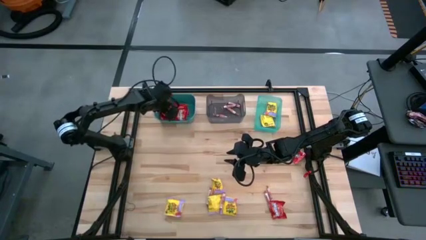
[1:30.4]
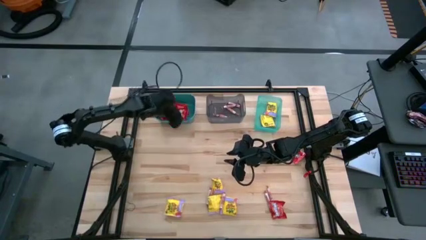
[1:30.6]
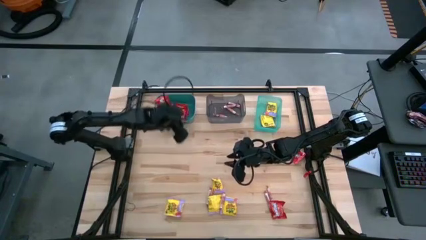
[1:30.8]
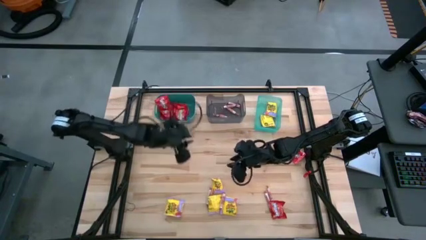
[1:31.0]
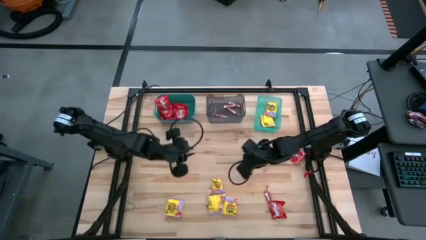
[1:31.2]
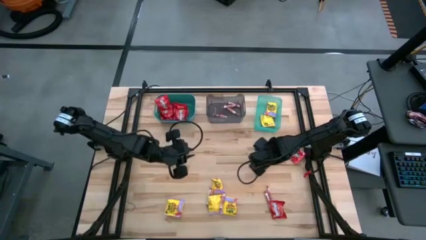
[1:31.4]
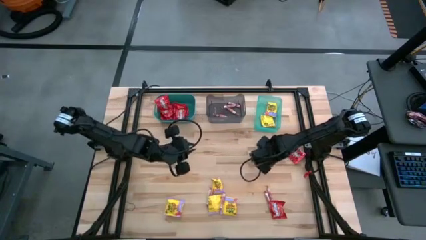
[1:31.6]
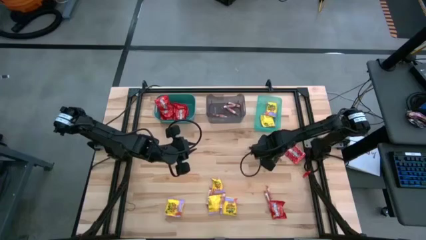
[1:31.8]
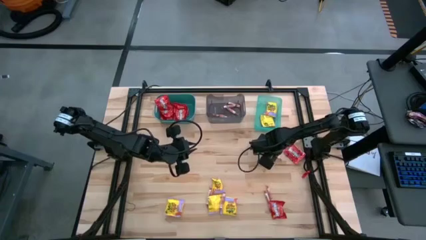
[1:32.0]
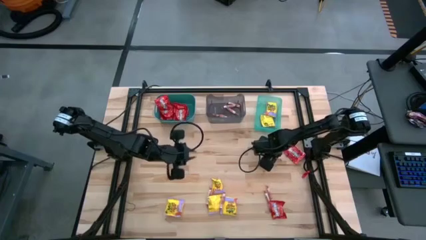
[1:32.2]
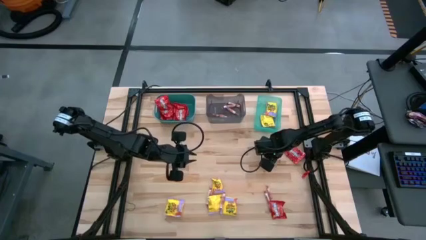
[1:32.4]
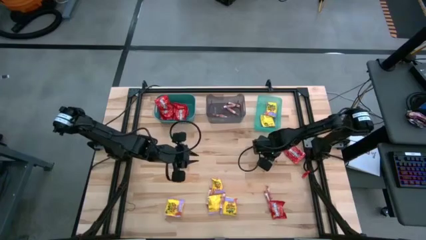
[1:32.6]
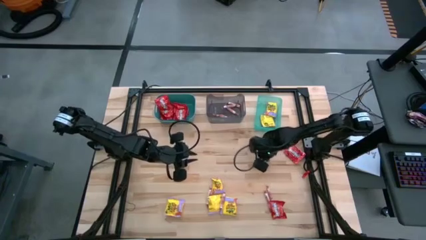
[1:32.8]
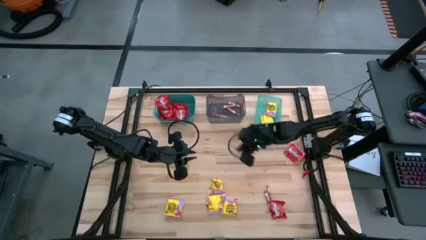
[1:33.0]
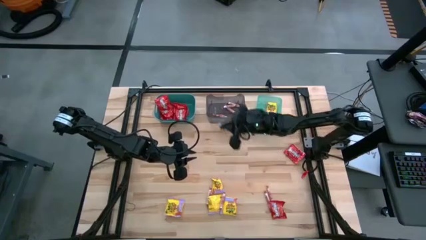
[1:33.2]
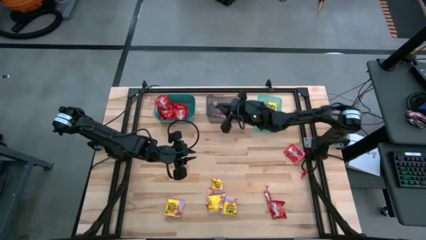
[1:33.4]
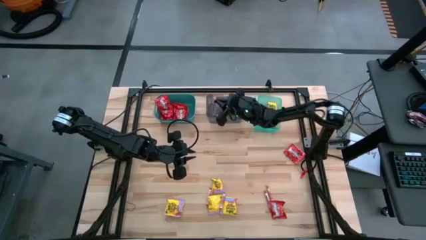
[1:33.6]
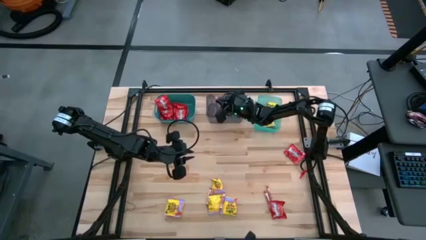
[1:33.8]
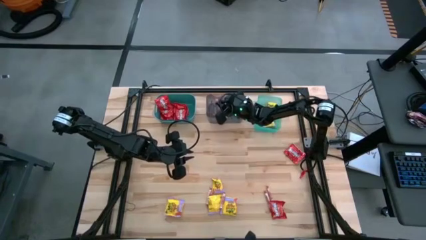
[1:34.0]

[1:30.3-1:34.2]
Task: Sort candy
Put the white candy into the black bin

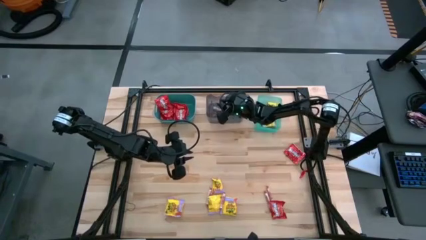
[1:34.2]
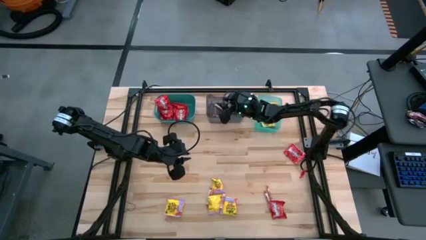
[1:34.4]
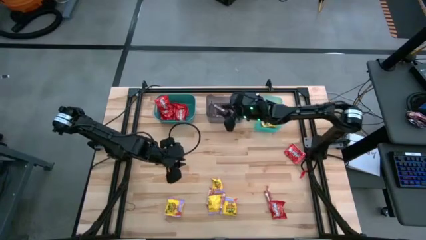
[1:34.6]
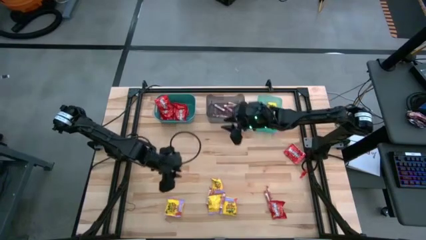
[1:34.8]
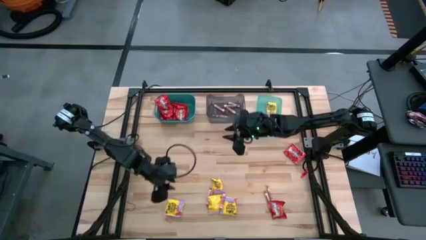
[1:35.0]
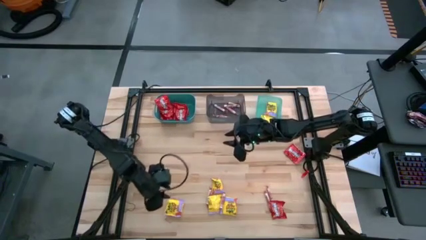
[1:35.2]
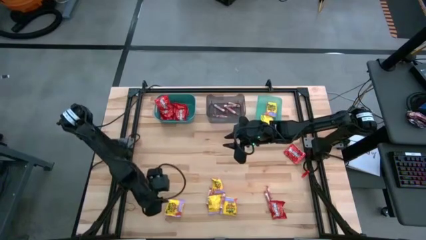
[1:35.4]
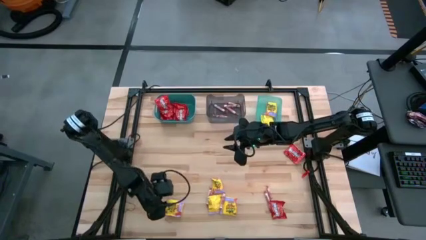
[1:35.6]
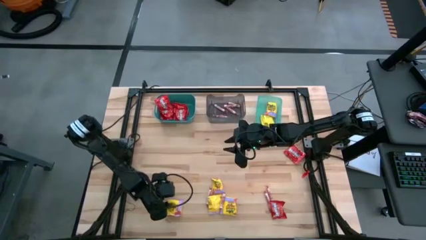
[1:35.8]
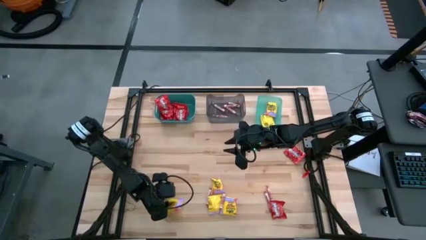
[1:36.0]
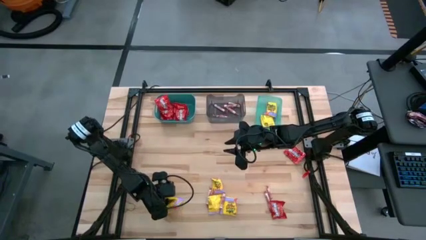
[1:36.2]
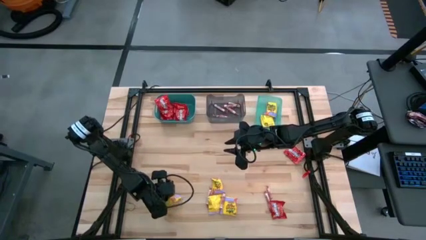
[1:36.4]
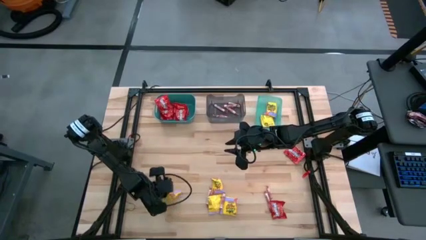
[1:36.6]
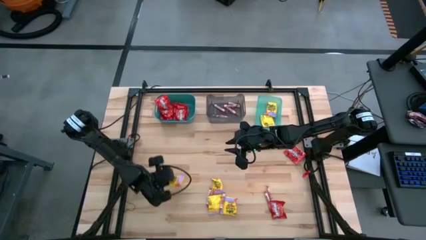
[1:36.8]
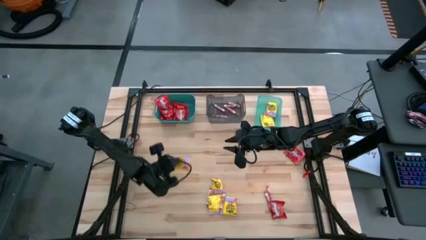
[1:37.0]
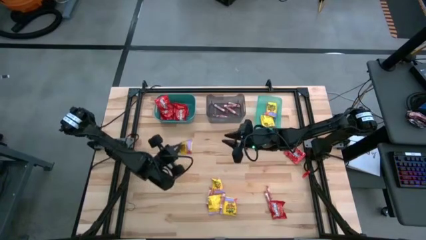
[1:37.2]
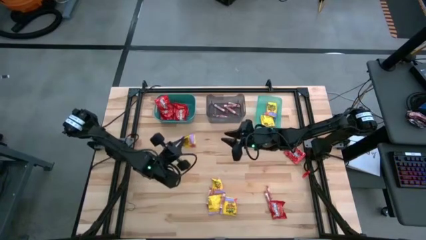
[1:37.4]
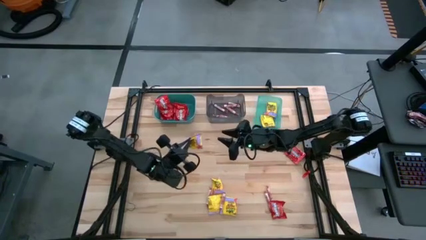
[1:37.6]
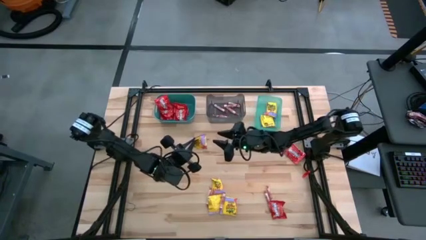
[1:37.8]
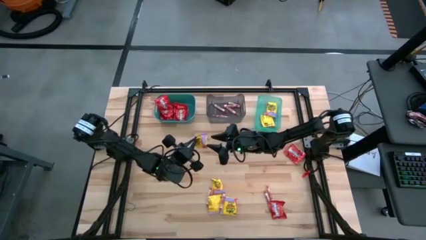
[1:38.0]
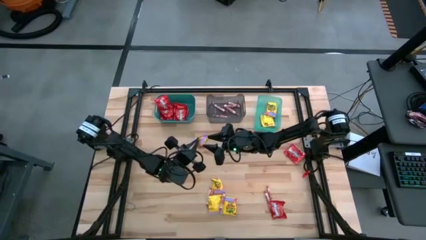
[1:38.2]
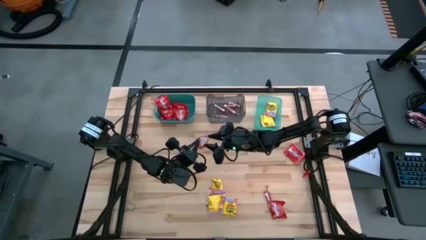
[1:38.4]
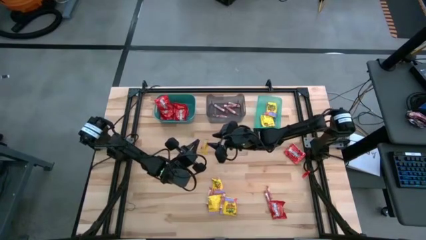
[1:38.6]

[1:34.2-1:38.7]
Put the yellow candy into the light green bin

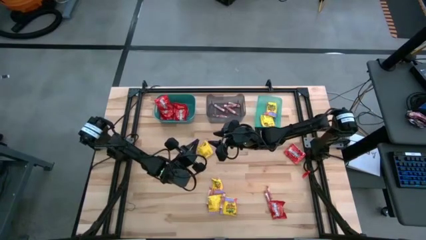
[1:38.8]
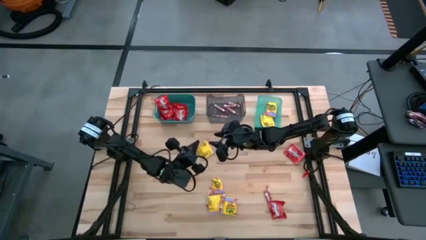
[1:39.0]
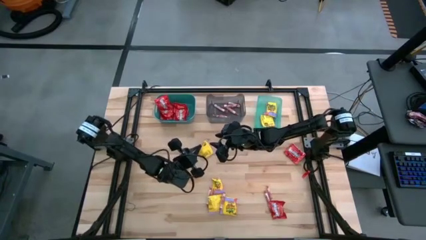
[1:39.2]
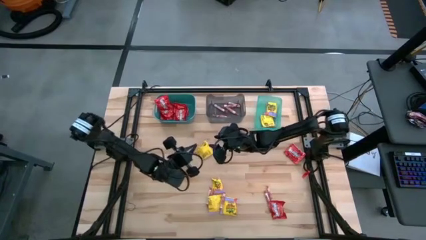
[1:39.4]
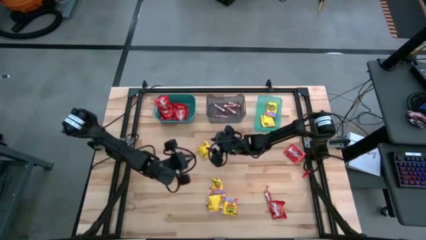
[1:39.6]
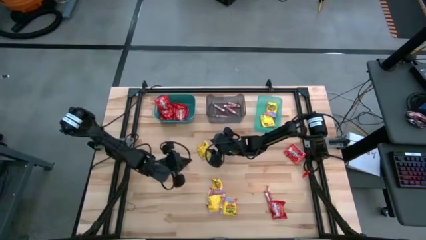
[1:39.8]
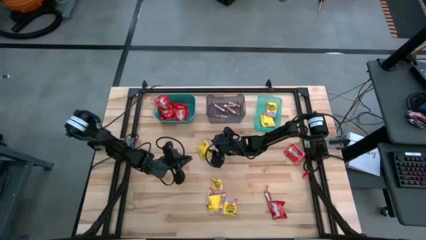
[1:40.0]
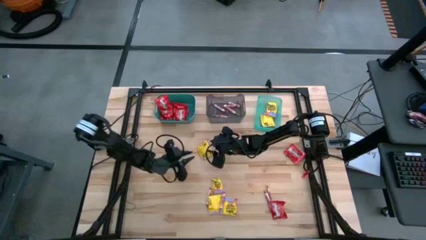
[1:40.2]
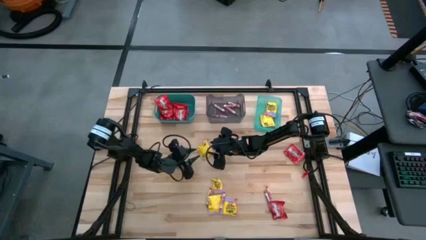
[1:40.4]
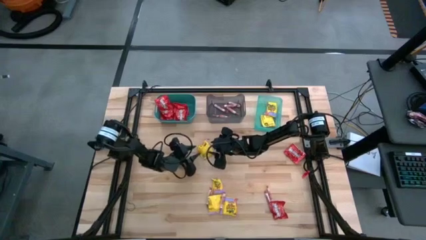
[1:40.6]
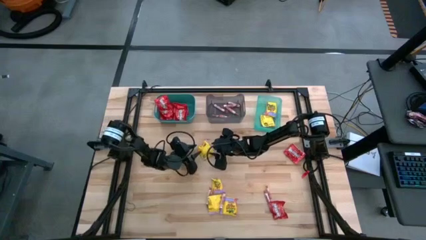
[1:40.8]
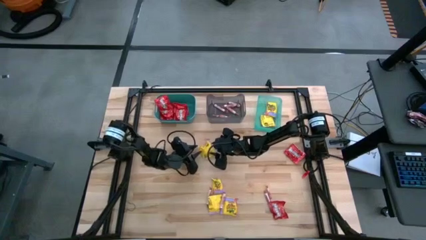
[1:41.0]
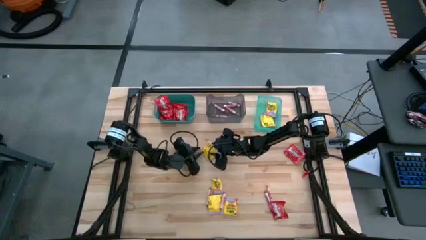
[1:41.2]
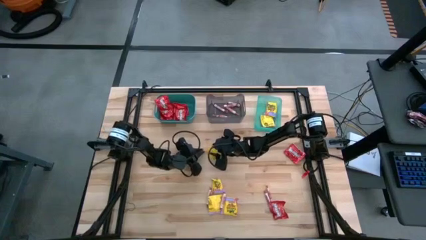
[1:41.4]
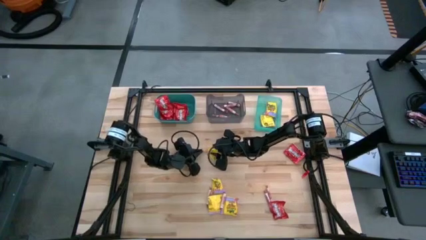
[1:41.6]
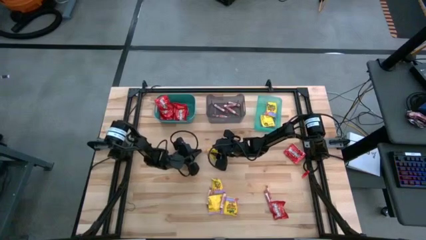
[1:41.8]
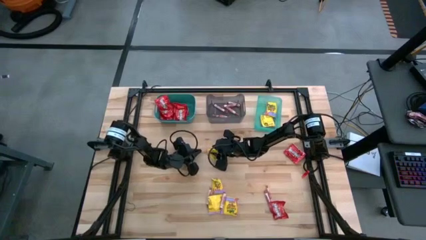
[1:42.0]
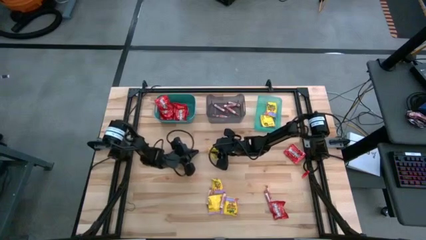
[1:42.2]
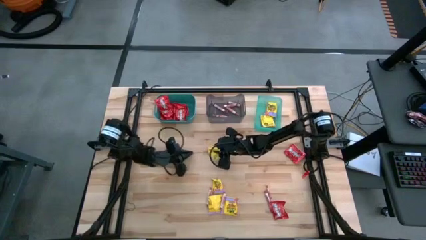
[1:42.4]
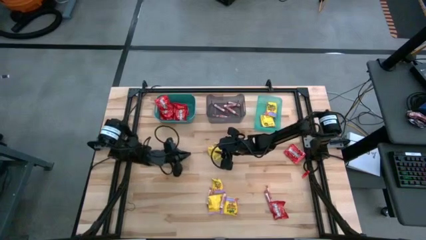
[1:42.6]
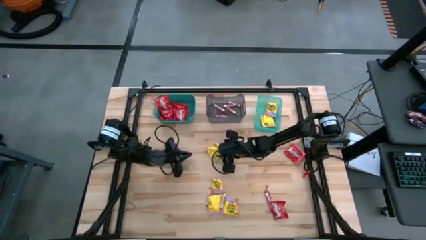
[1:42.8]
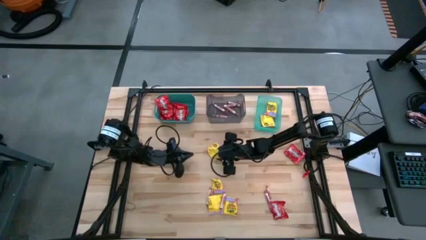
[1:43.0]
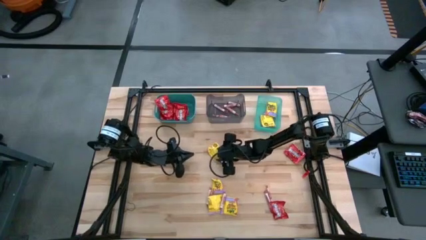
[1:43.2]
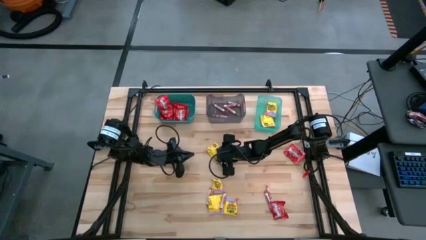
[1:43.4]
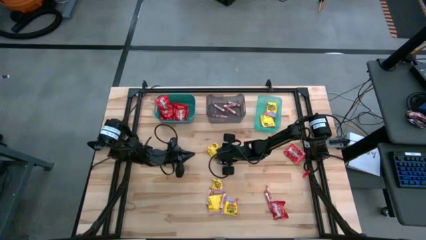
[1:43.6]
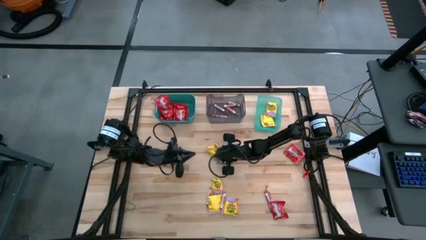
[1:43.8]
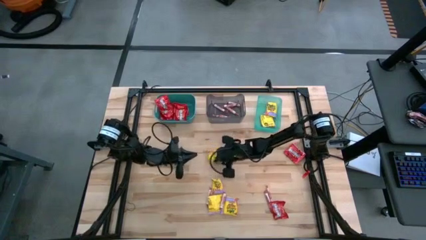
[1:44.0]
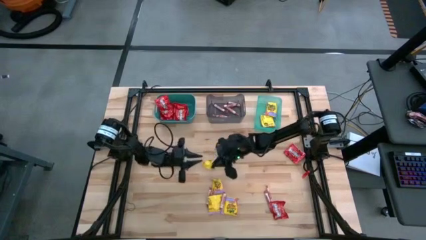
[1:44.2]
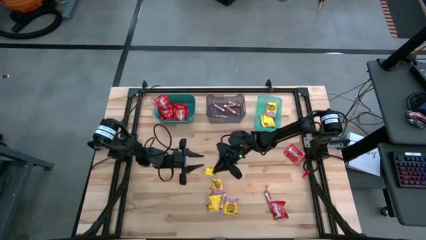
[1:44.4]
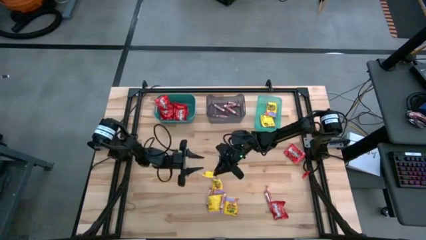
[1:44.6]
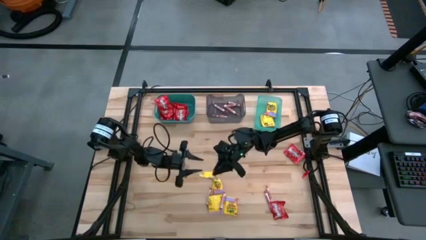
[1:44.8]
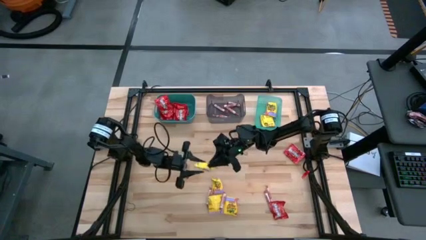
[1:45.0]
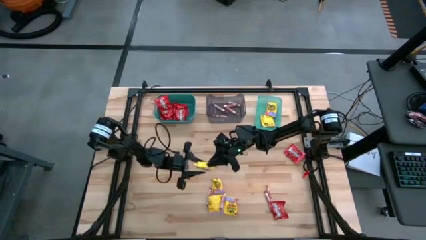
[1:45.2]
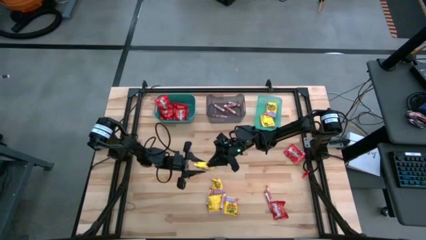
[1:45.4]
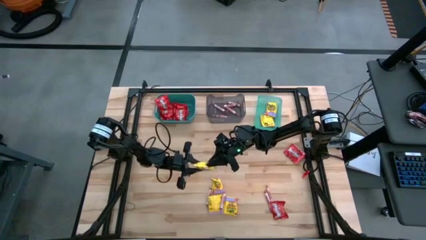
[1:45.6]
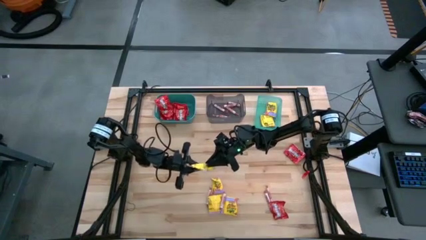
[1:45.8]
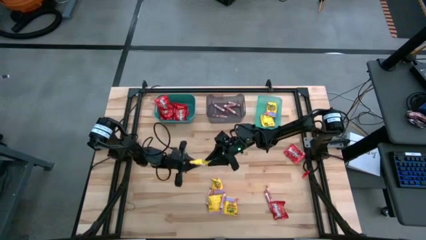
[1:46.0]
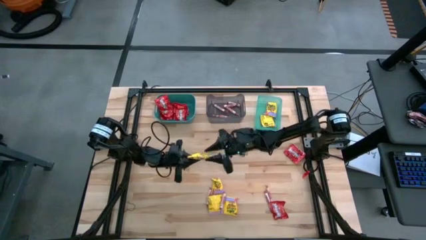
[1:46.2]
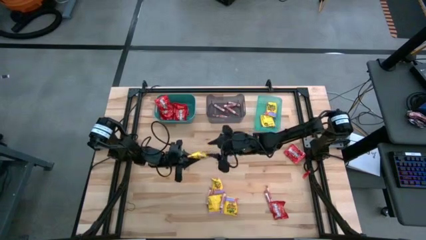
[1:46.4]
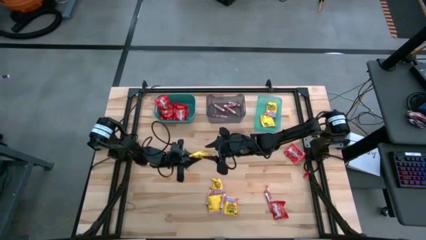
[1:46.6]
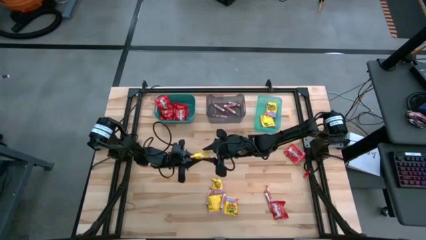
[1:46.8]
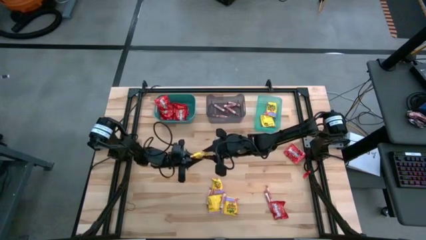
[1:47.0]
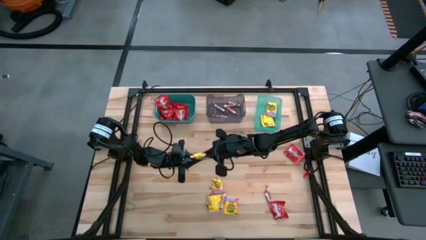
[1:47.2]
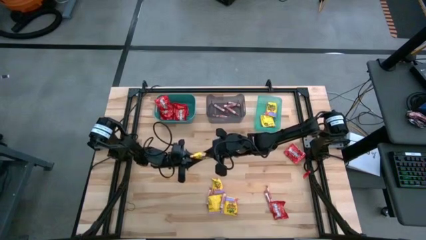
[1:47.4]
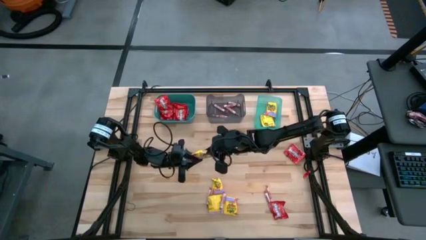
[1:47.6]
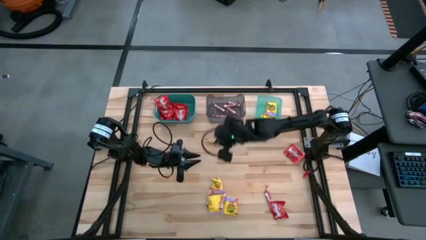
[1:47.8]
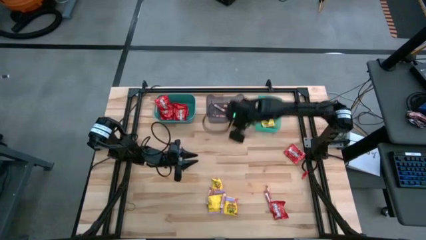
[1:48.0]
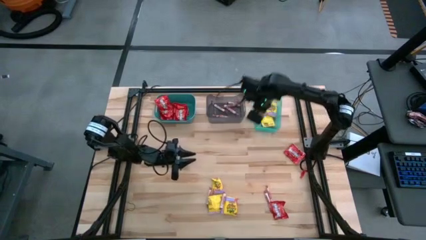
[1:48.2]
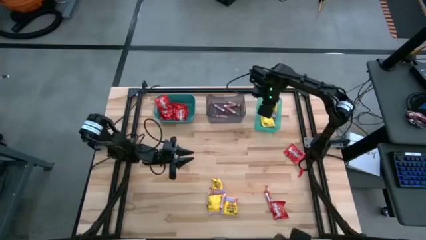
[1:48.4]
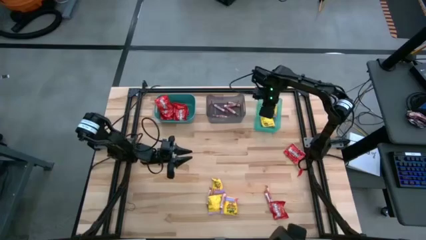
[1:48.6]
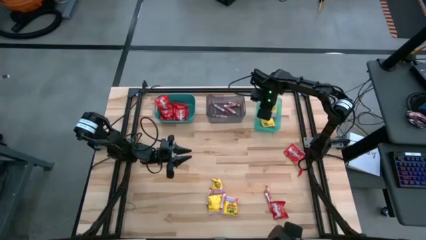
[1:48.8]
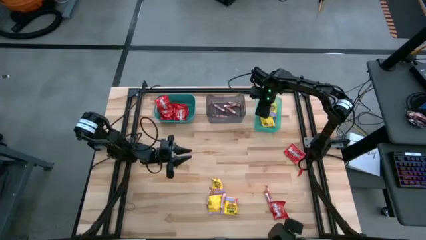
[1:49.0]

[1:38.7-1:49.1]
Put the yellow candy into the light green bin
